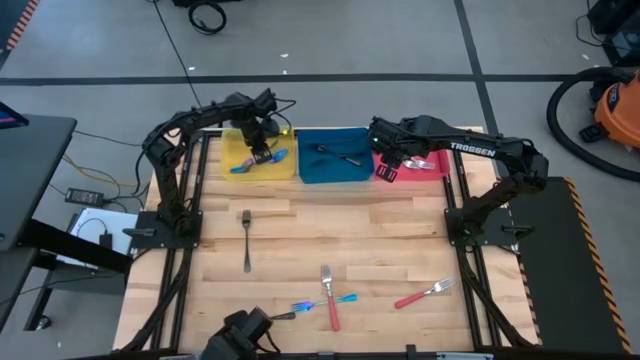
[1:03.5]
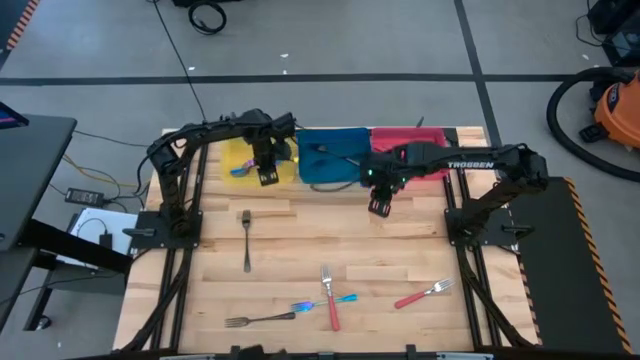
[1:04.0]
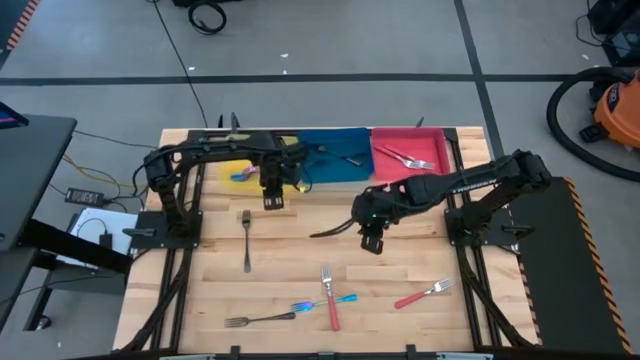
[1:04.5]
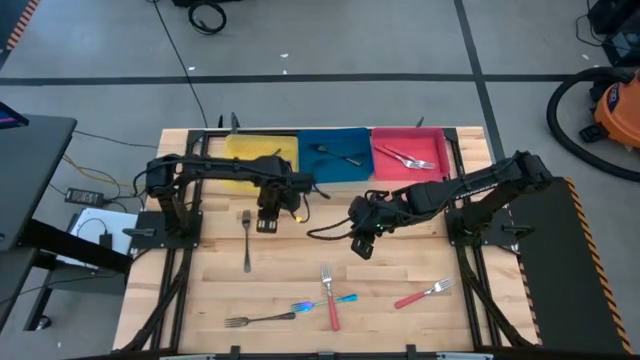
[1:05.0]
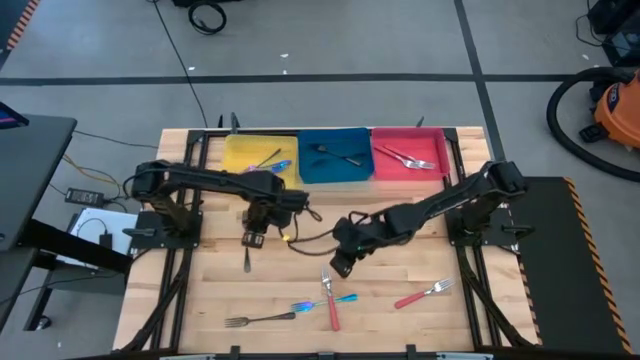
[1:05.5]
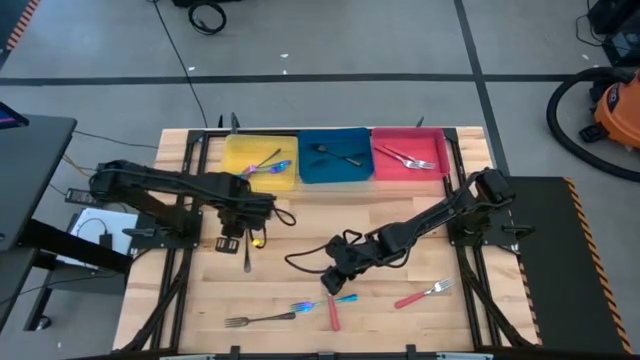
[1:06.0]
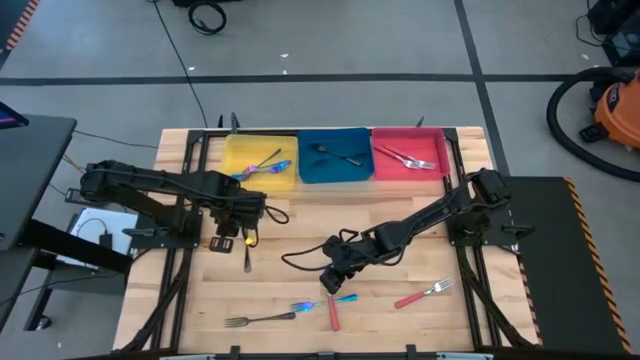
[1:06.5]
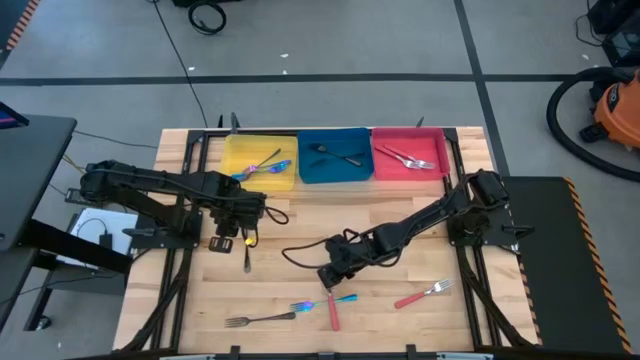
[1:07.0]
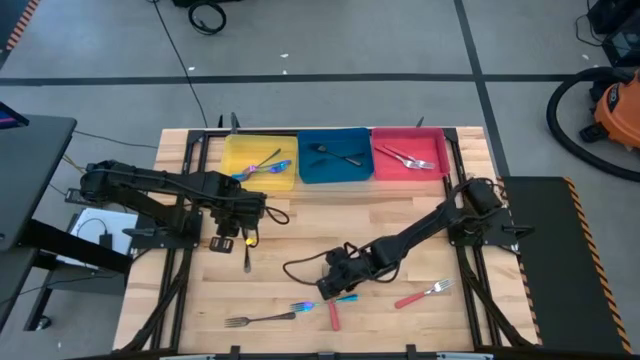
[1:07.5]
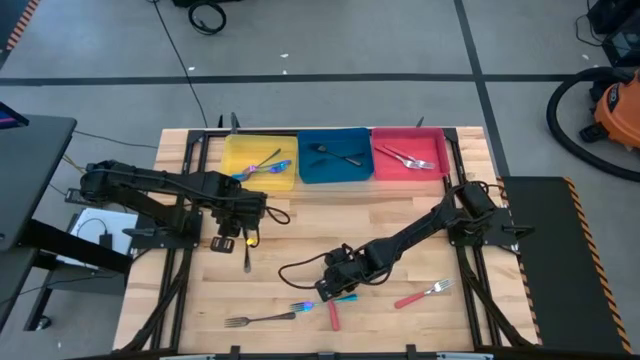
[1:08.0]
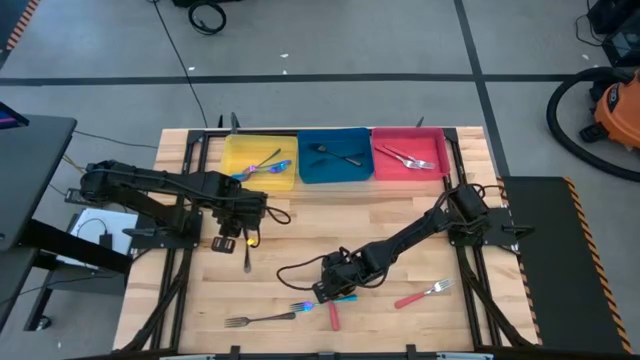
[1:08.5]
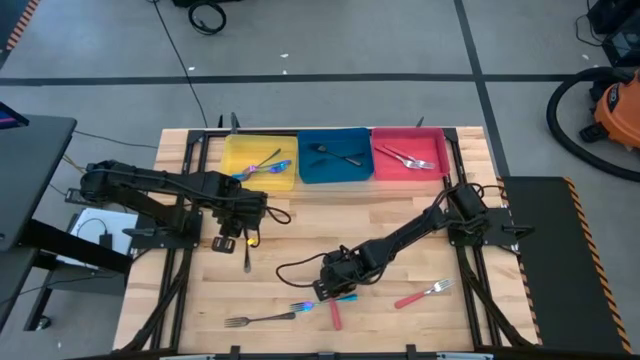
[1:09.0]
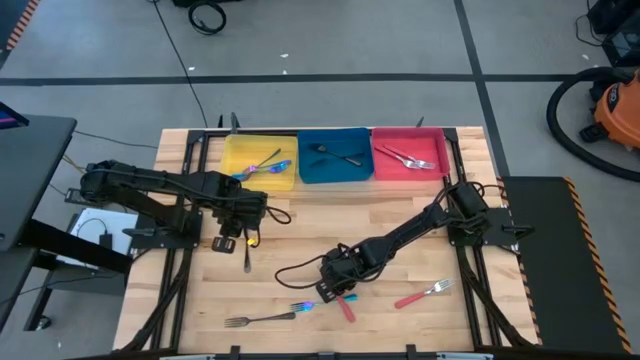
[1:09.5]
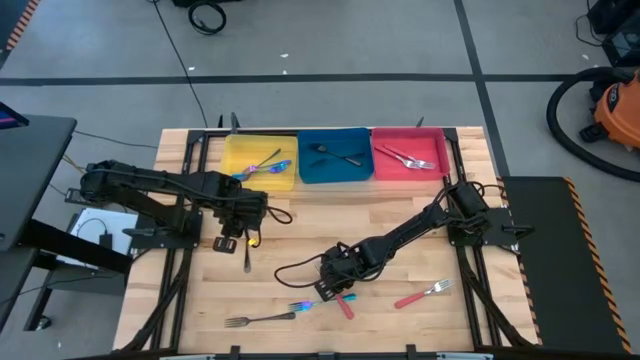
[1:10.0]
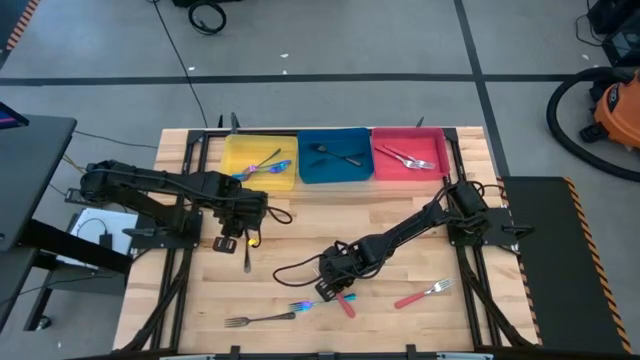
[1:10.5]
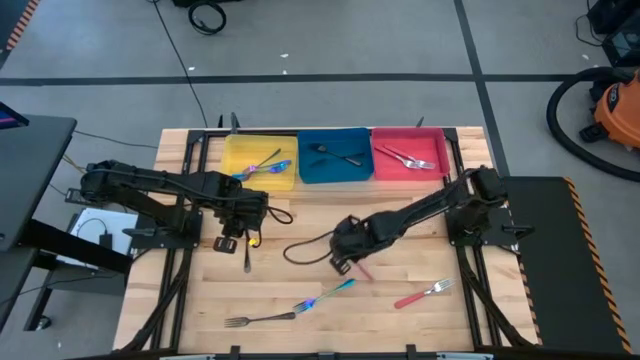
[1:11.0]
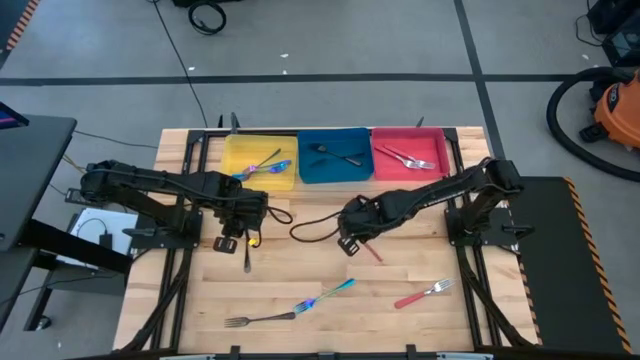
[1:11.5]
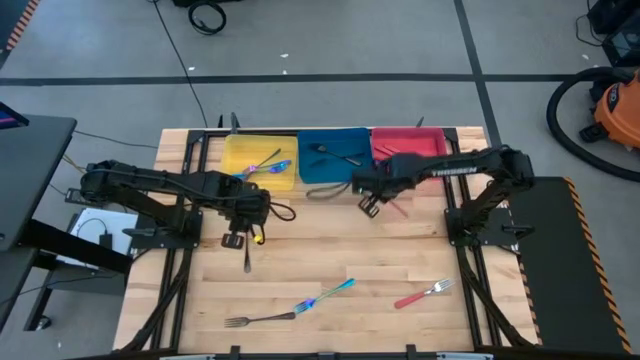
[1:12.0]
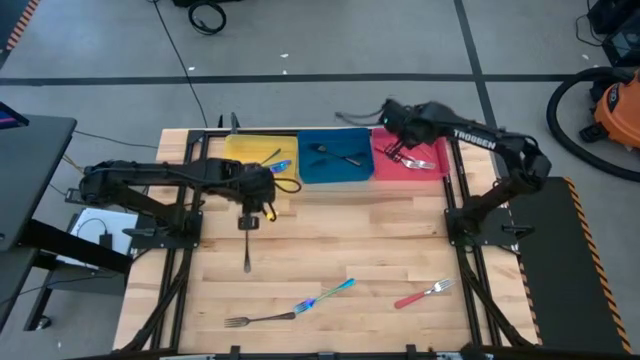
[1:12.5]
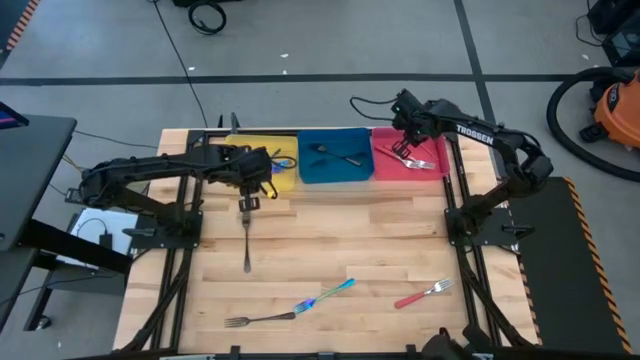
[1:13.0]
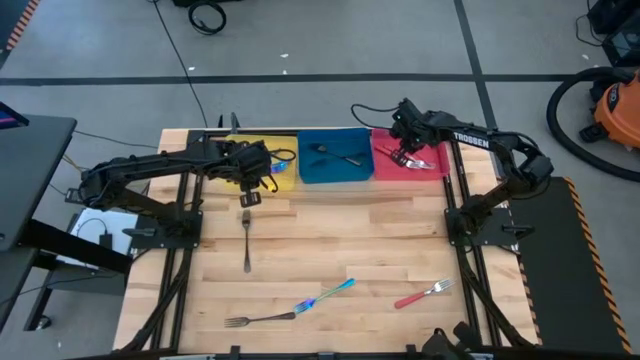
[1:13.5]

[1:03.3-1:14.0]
Task: Sort silverware by color (type)
Put the pink fork into the pink bin

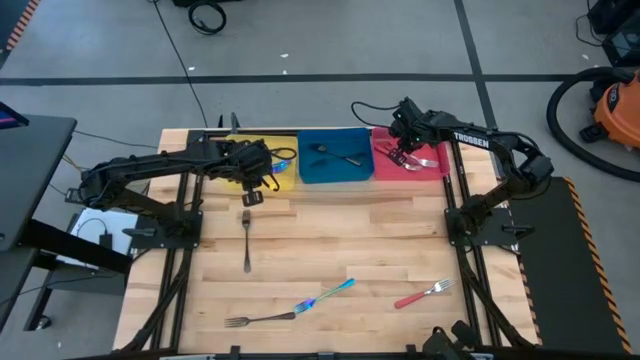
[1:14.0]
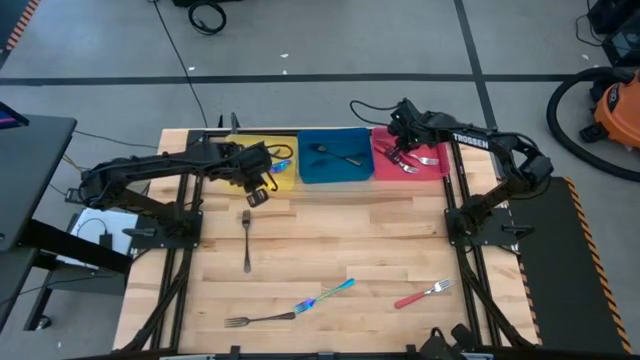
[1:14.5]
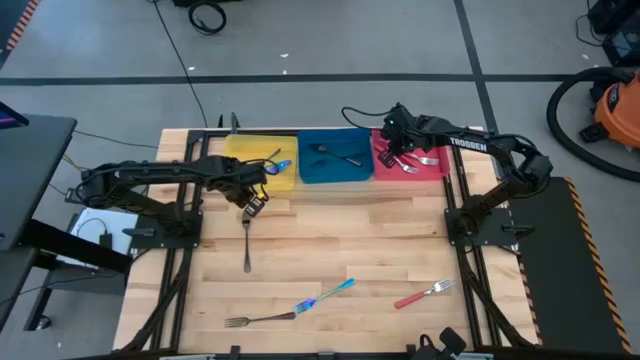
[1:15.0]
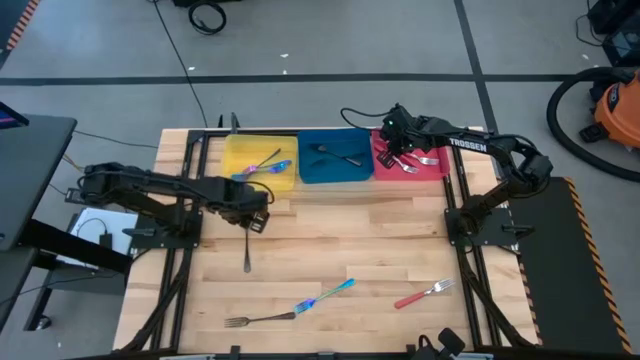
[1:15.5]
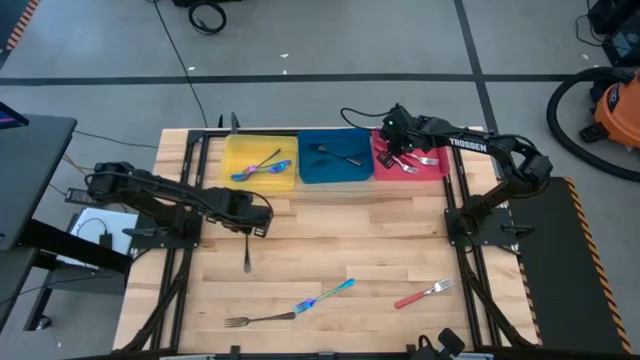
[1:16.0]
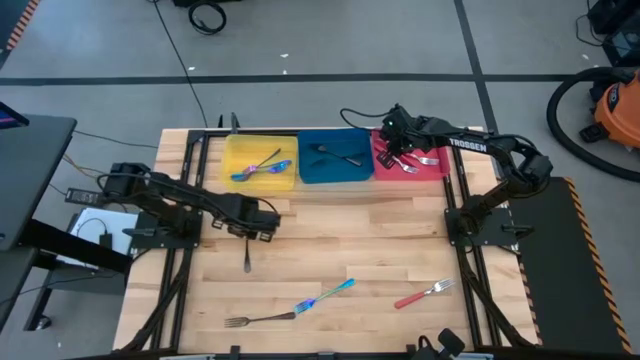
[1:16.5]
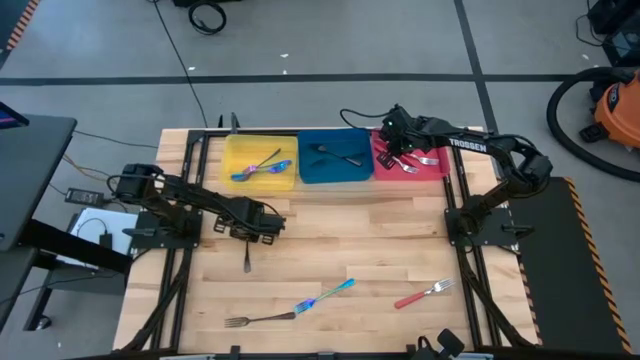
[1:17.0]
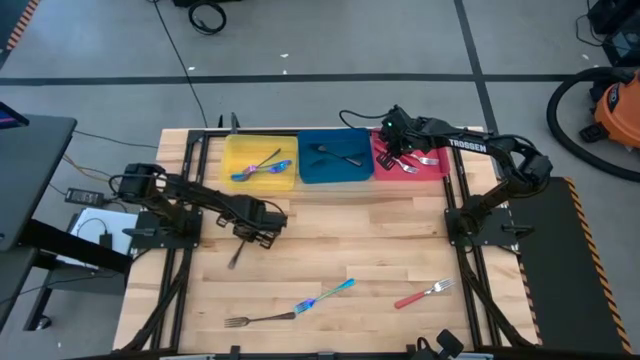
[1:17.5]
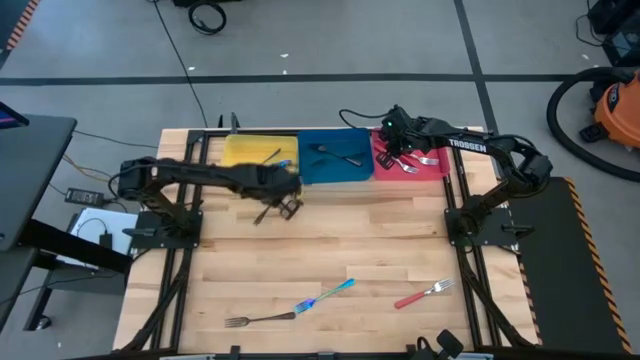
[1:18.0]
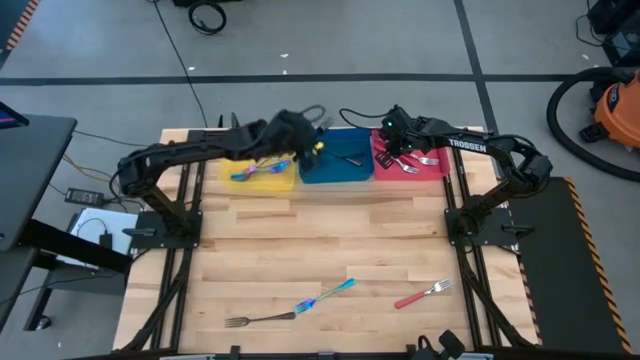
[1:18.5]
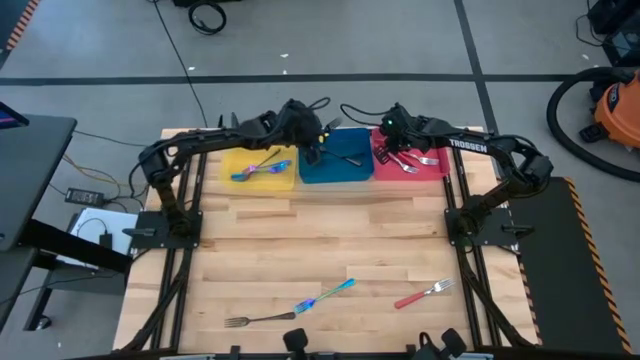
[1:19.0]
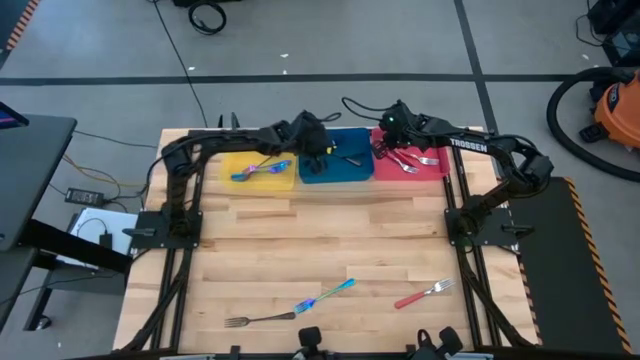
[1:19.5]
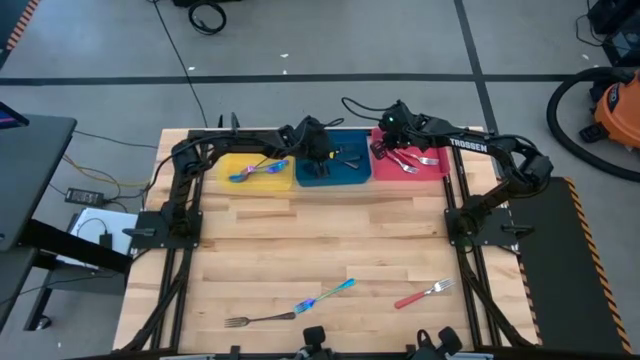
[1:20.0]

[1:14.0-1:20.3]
Put the black fork into the blue bin

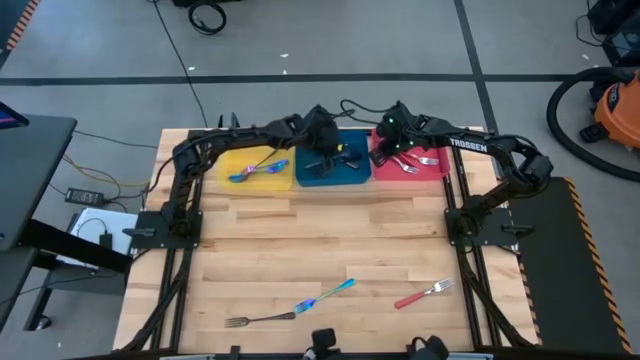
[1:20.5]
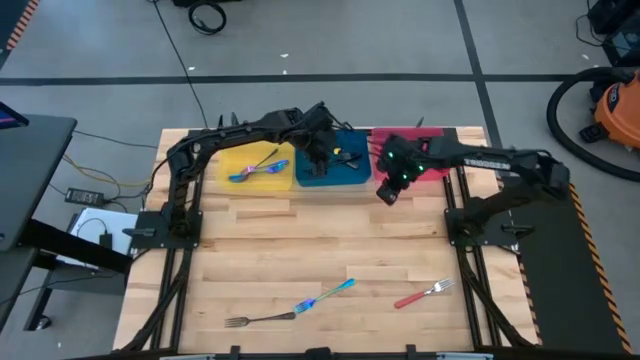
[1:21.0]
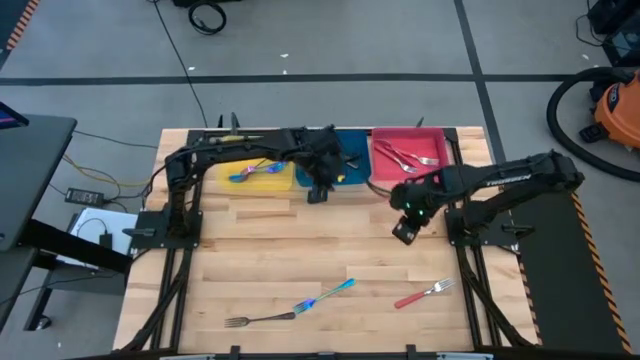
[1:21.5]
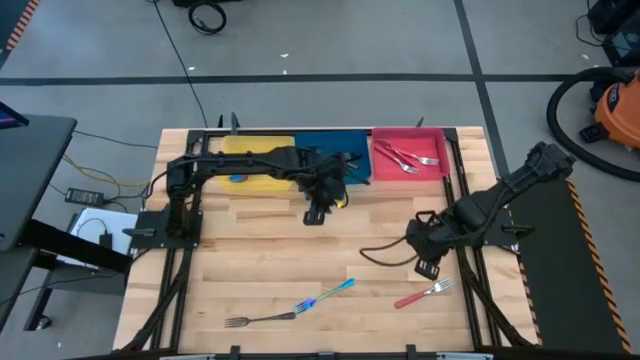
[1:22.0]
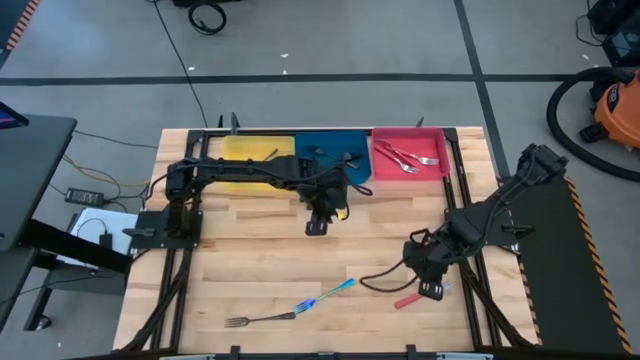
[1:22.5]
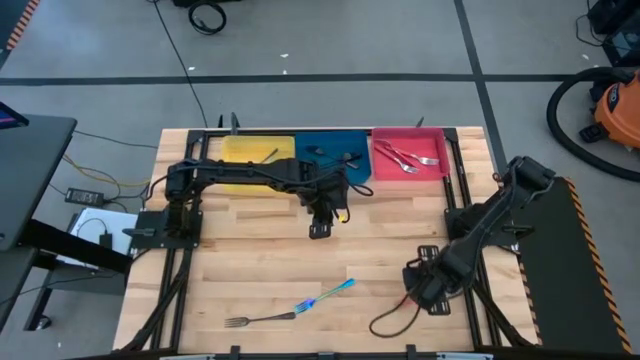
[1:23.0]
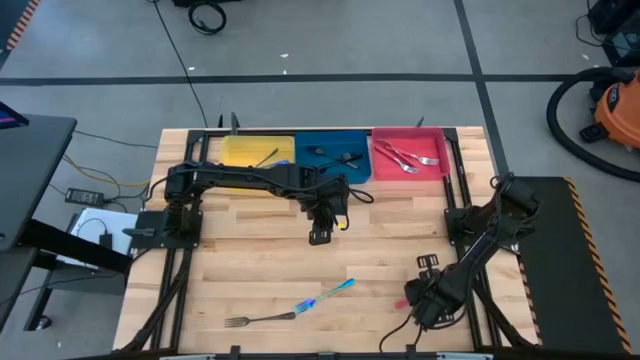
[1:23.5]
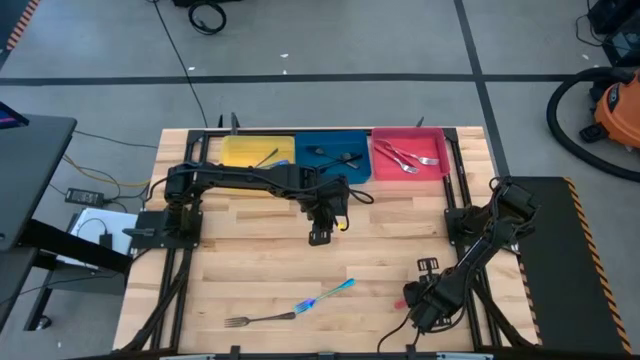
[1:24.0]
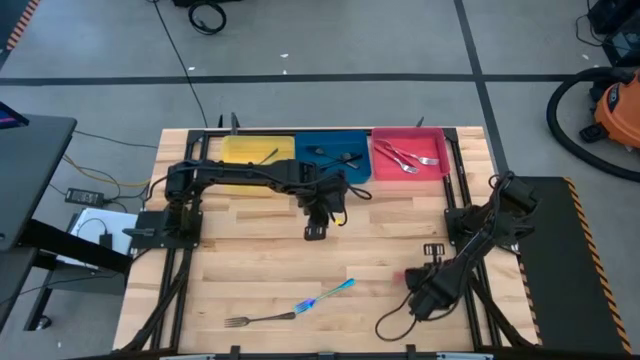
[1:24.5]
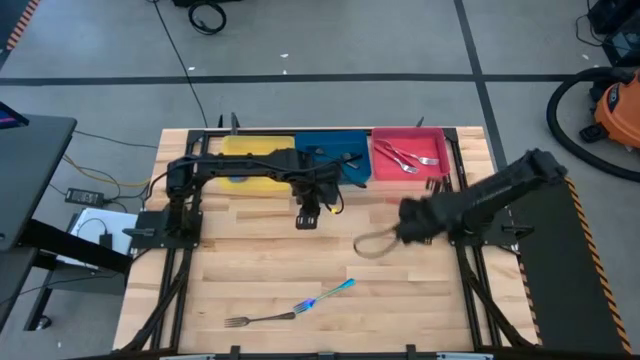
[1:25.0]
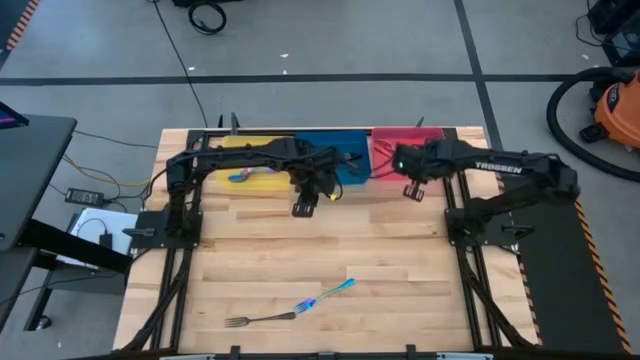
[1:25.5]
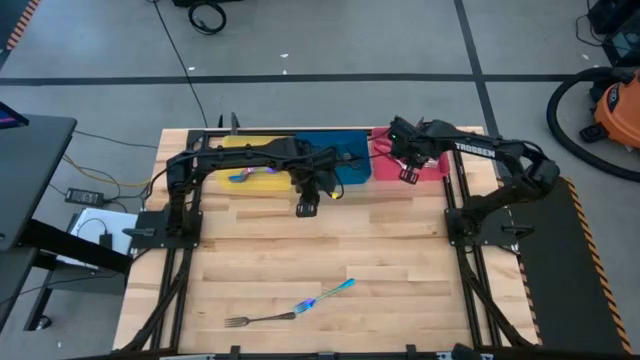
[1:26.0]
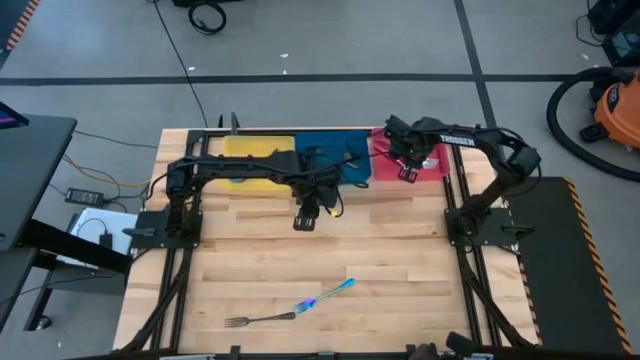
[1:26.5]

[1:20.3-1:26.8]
Put the pink fork into the pink bin
